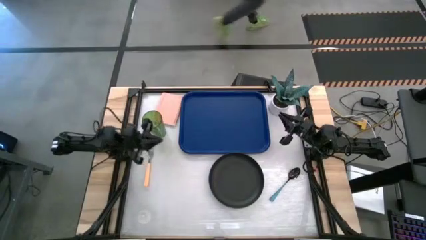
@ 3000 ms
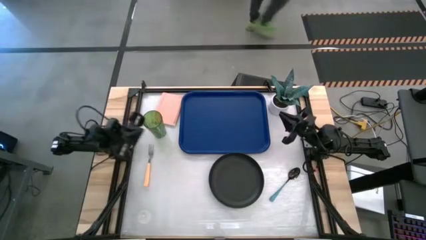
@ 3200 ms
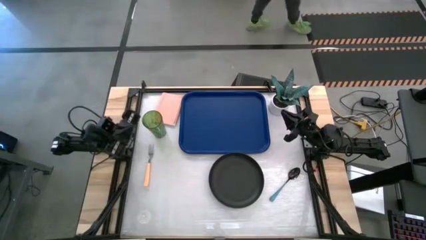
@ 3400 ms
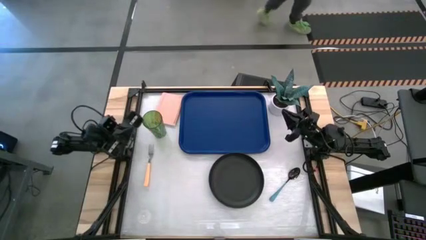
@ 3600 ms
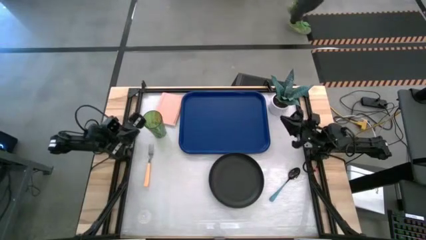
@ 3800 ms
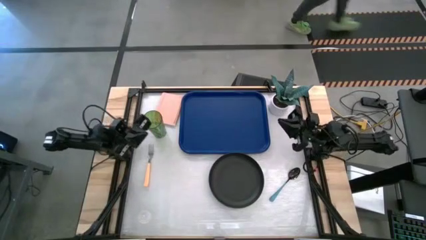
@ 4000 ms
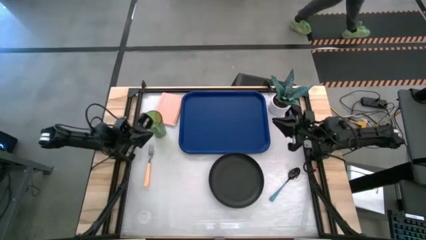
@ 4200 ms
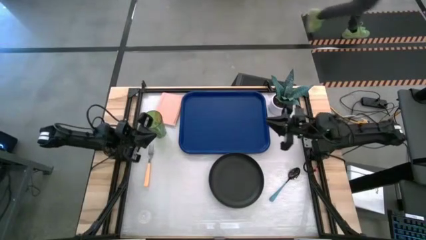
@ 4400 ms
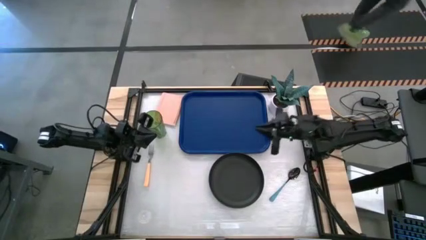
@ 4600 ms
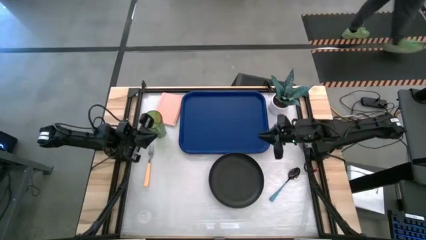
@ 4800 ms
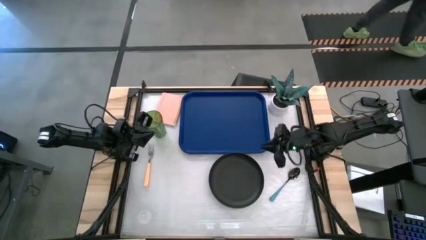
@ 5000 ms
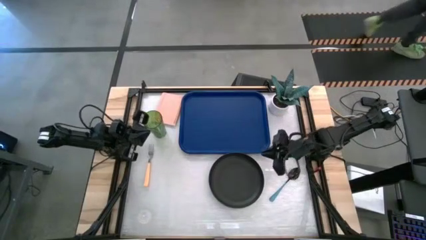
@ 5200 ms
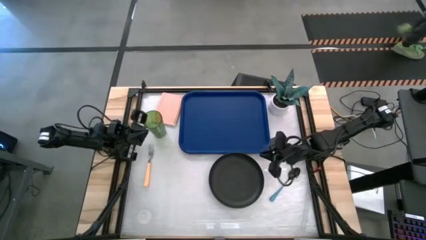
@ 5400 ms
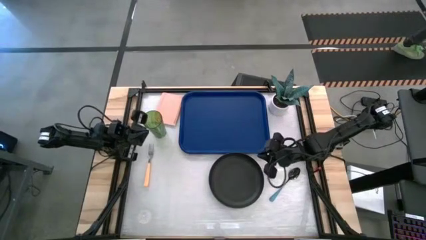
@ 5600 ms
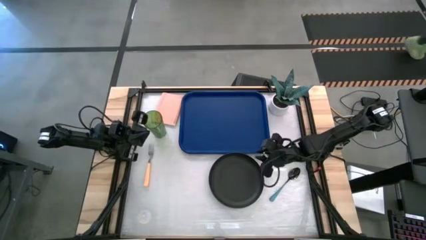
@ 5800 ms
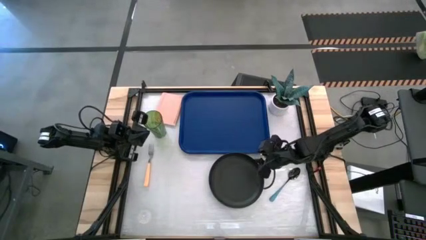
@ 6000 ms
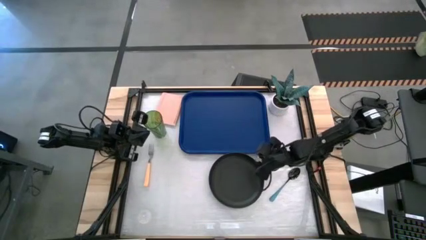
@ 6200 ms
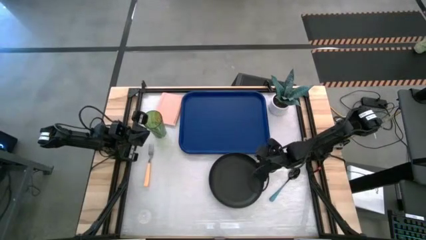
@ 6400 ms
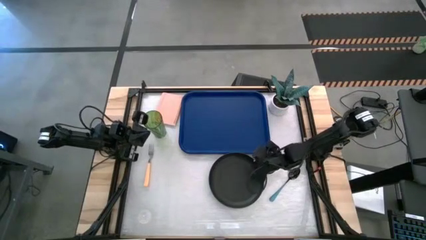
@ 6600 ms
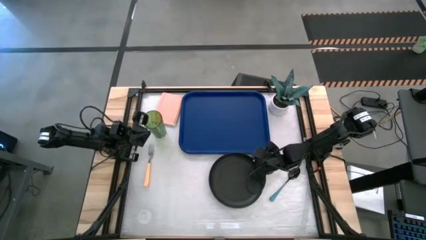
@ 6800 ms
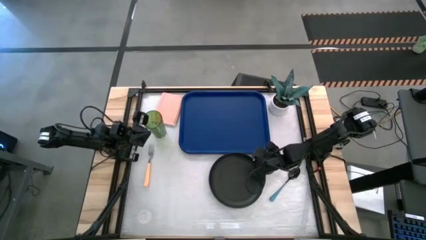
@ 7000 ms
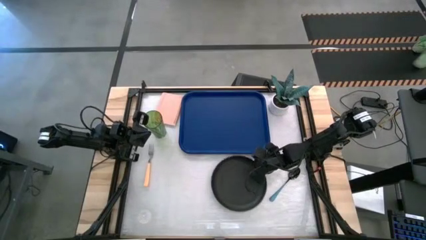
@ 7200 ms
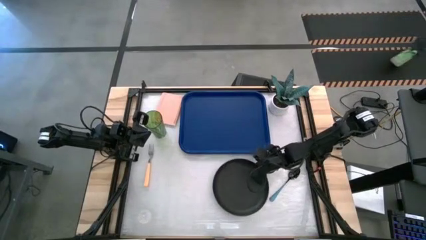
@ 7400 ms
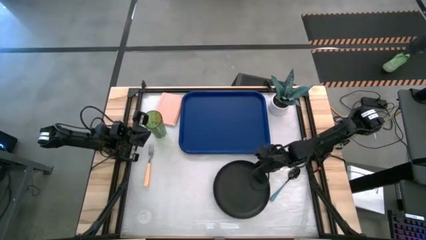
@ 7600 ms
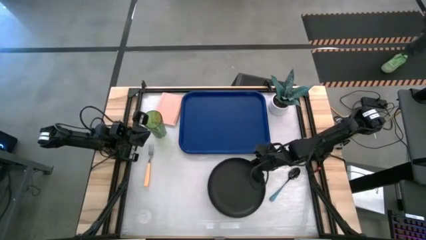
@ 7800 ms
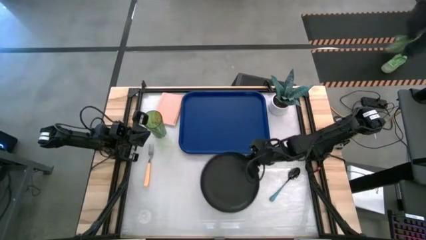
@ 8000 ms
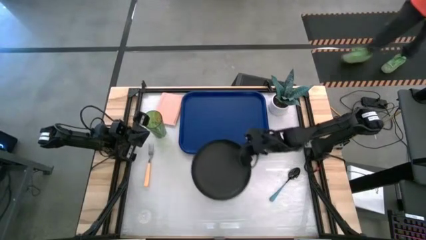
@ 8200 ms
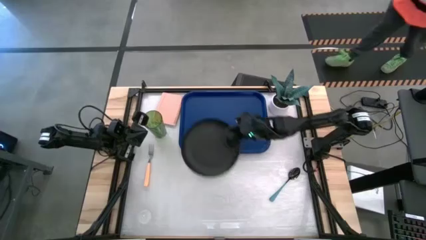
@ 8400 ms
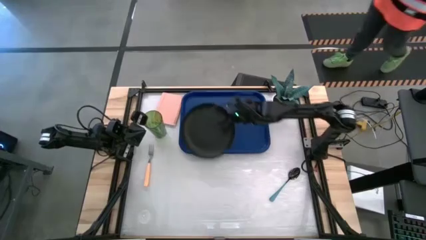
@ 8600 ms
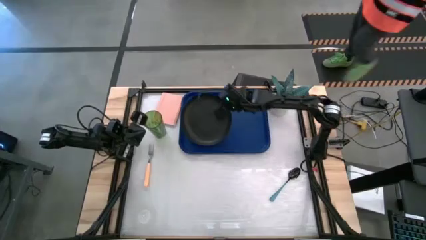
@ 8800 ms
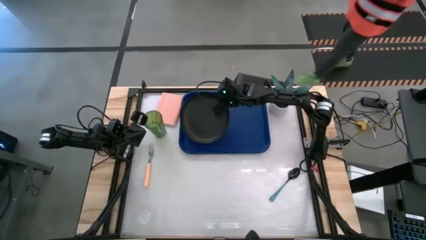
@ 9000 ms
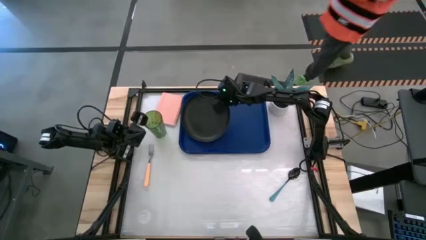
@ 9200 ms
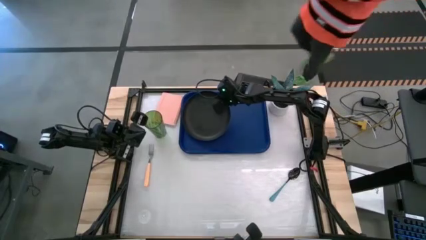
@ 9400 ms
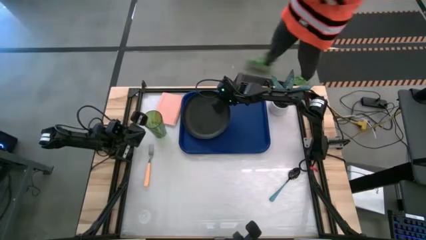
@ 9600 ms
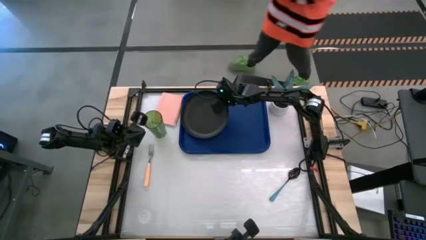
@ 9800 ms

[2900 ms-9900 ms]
Task: Pick and place plate/cup/fork/spoon on tray
Put the black plate to the top left of the blue serving tray

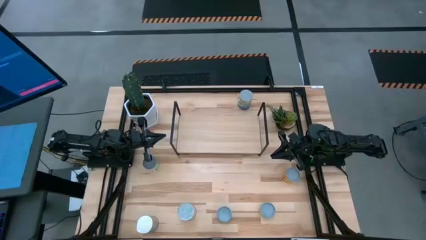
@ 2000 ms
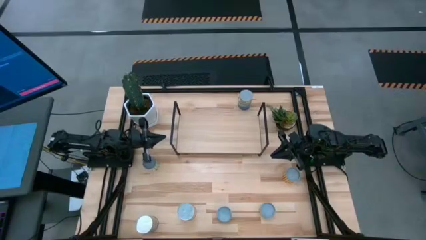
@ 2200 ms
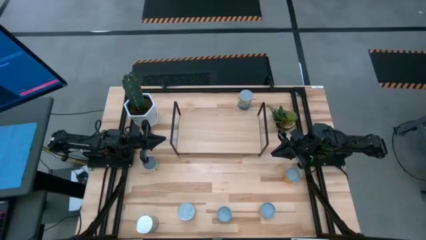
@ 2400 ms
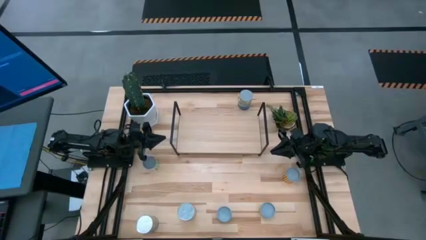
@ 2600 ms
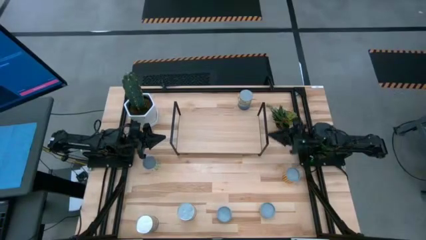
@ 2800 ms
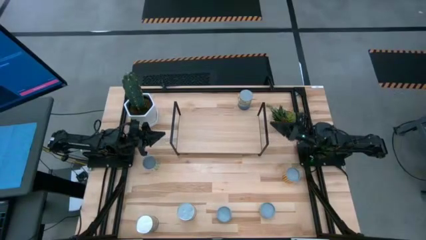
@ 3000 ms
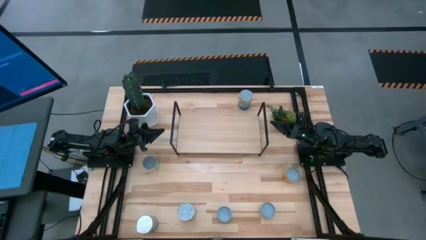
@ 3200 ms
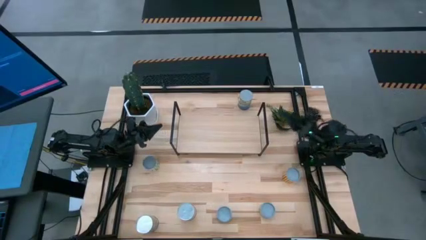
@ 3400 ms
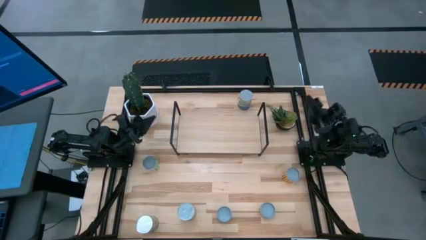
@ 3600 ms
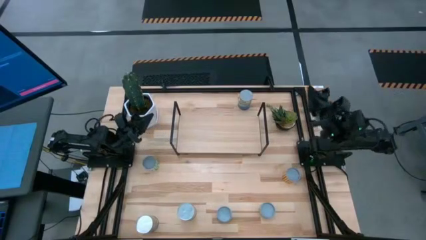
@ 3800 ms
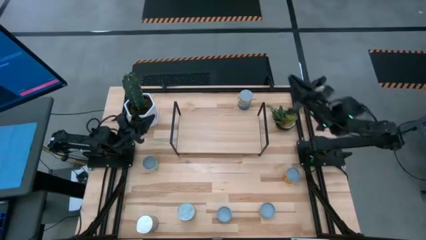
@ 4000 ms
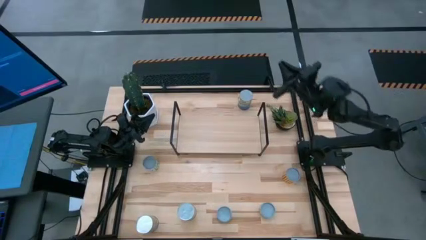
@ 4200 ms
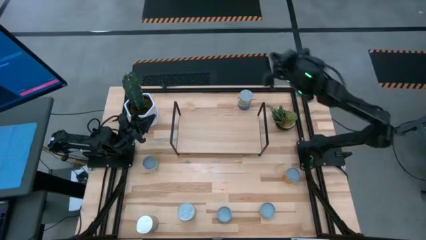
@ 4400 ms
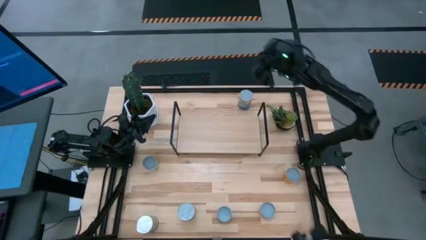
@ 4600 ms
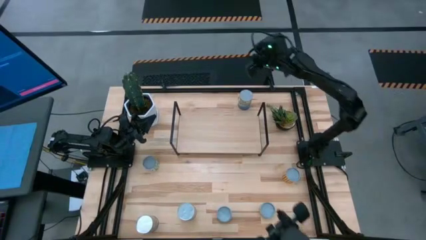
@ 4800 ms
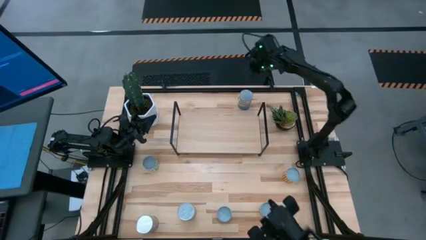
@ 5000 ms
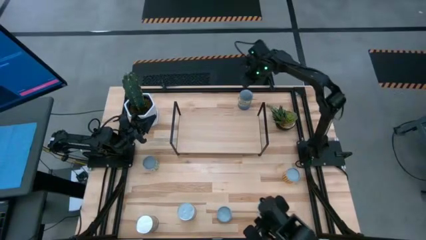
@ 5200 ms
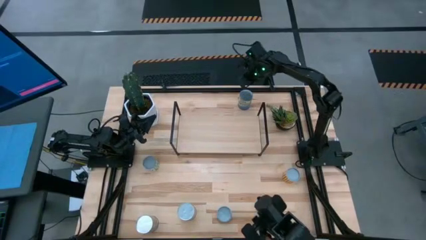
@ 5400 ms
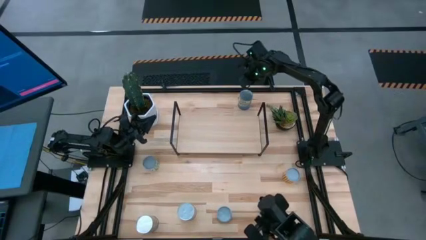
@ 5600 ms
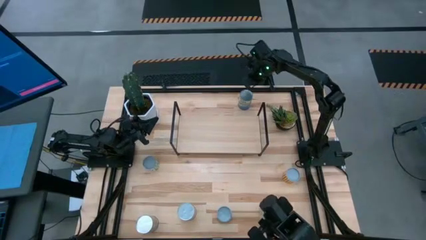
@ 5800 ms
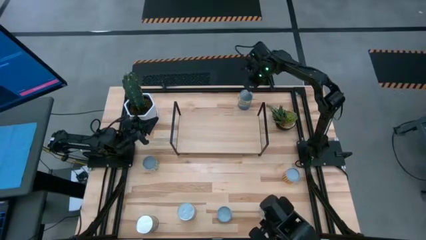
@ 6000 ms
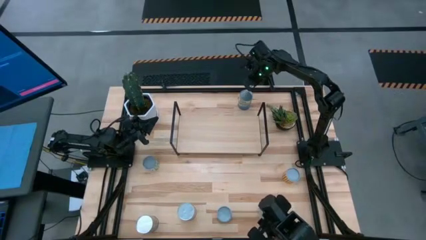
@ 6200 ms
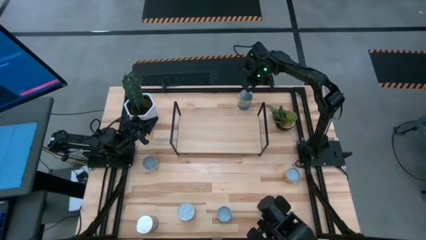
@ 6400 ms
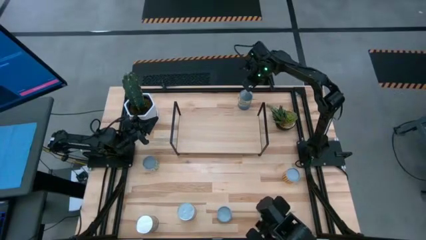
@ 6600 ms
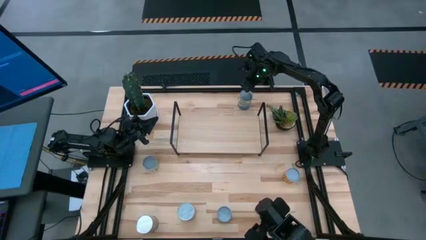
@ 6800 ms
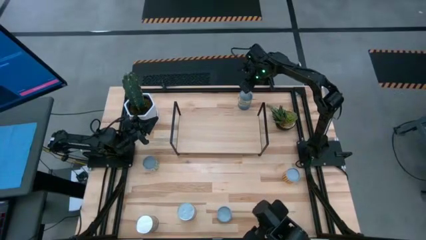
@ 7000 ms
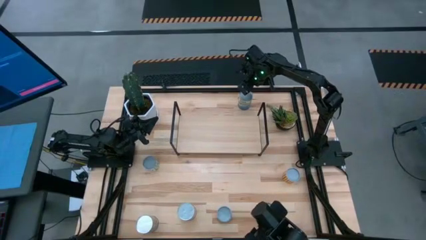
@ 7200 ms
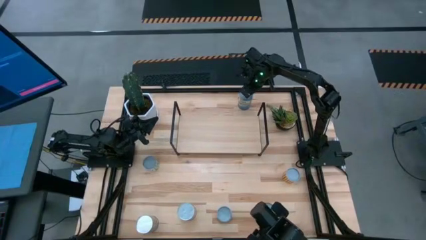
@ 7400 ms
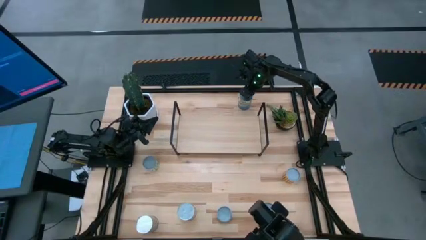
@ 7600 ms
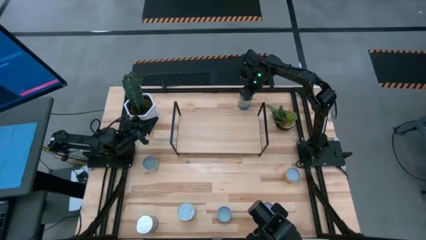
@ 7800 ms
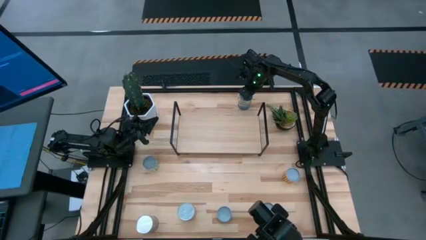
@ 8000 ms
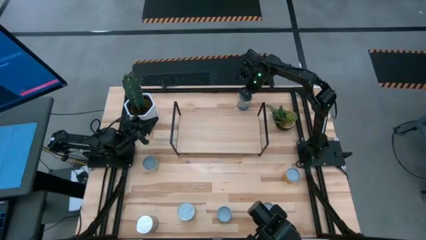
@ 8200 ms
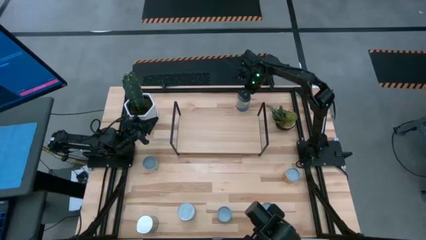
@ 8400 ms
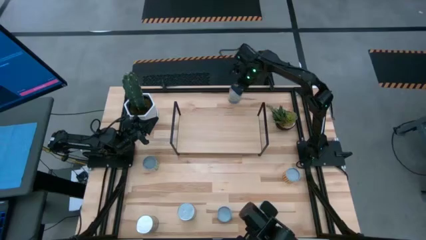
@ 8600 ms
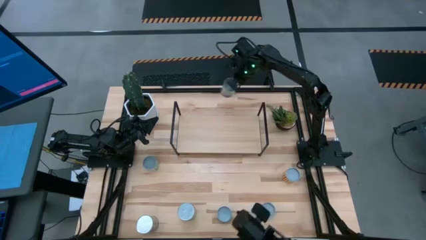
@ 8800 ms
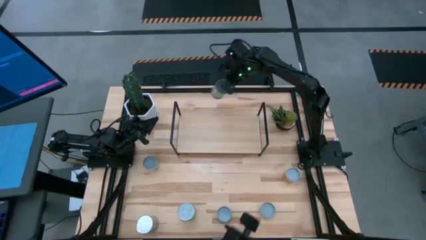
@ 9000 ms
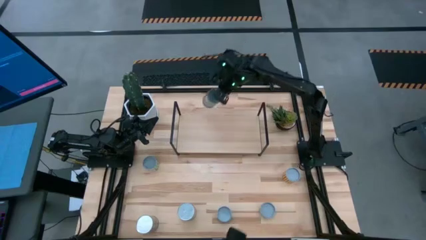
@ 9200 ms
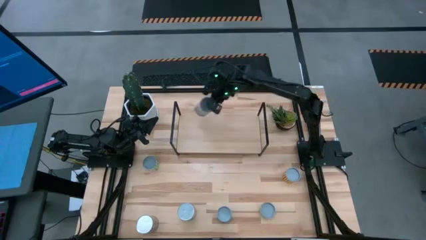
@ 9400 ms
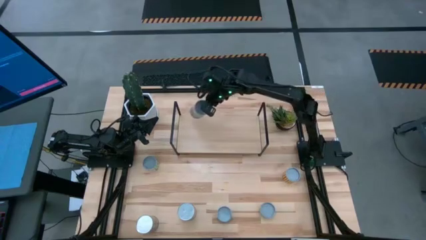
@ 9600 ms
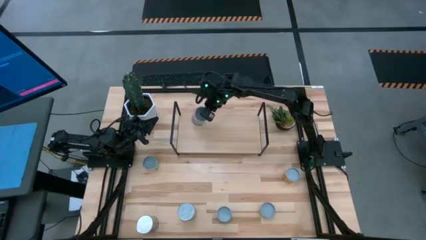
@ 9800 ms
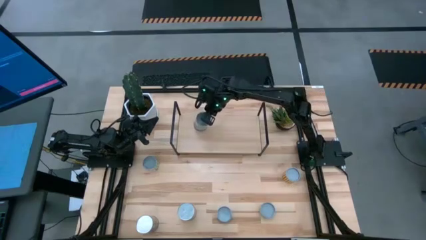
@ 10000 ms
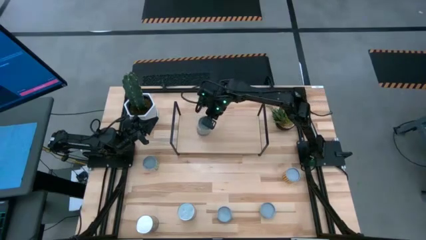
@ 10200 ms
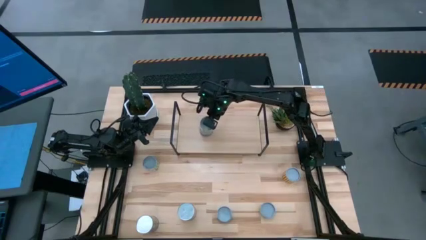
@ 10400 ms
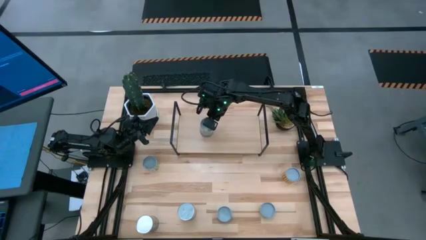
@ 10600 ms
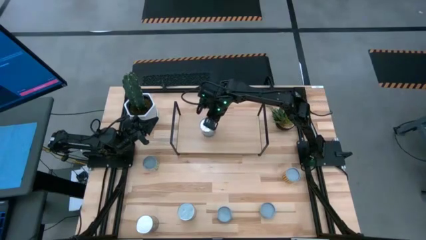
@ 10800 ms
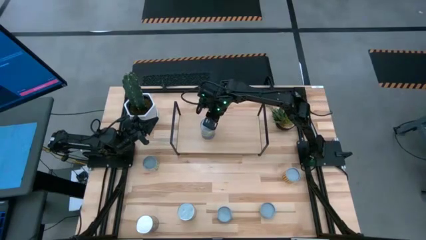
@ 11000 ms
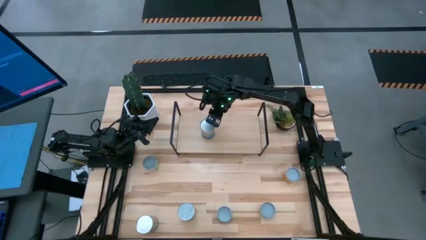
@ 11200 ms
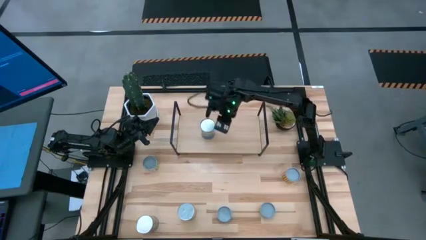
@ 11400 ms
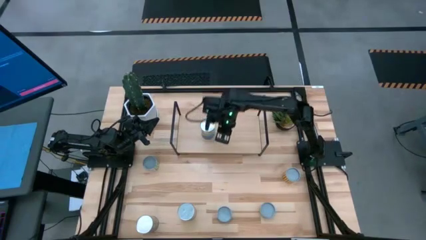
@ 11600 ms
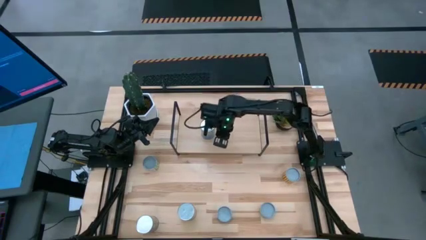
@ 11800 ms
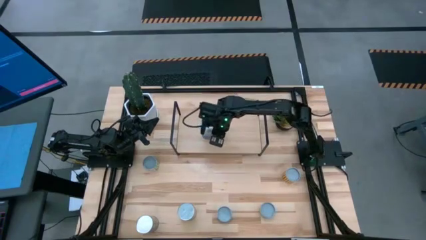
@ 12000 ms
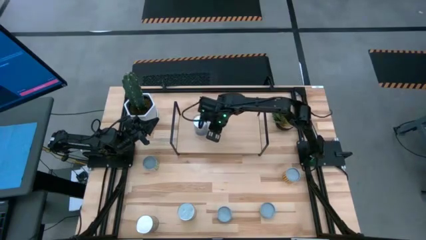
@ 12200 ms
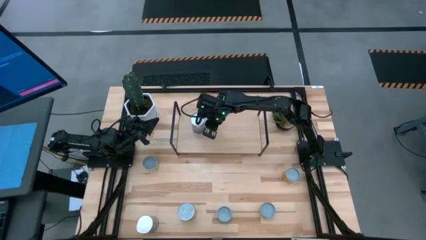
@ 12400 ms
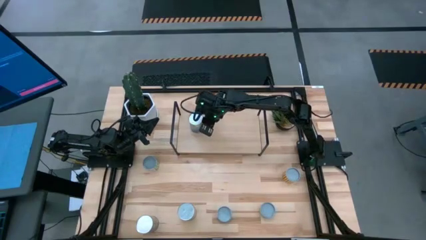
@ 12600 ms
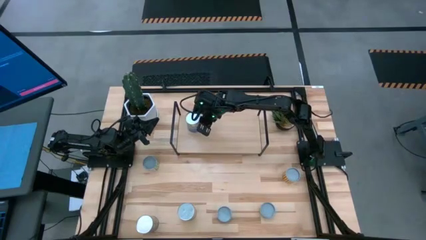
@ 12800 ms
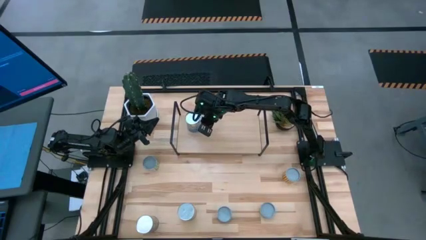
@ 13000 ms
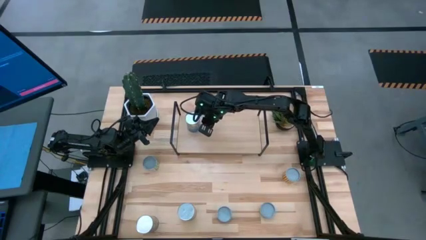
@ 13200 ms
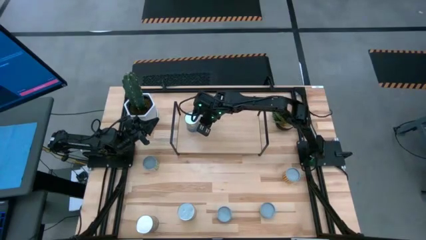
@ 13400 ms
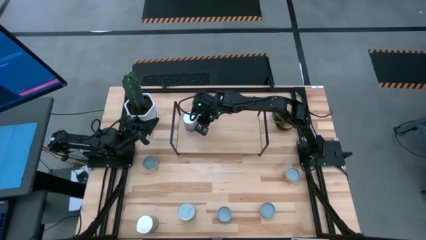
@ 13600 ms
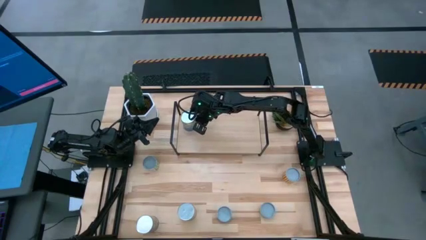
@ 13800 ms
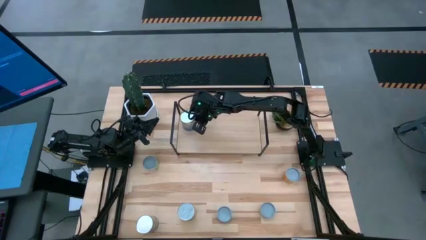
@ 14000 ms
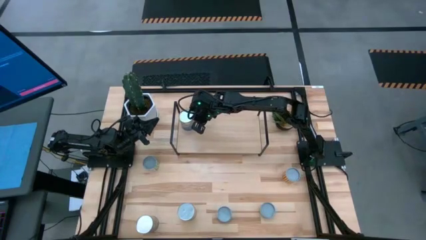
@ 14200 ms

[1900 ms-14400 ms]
Task: Pick and place cans onto a shelf
Put the canned peas on the shelf
